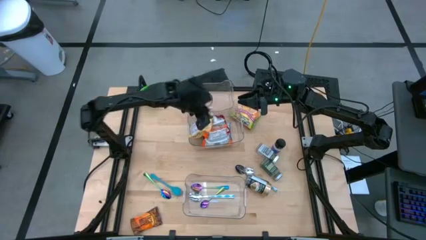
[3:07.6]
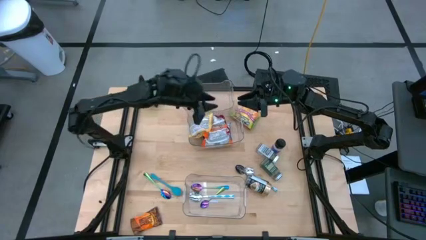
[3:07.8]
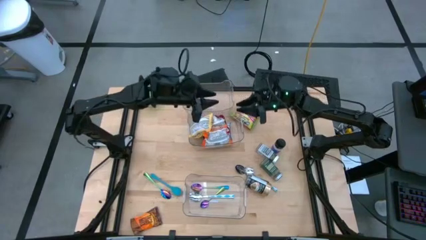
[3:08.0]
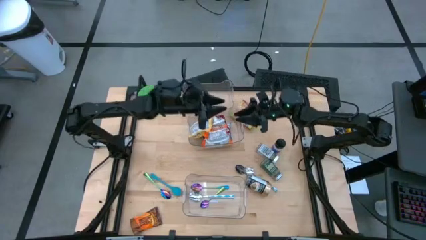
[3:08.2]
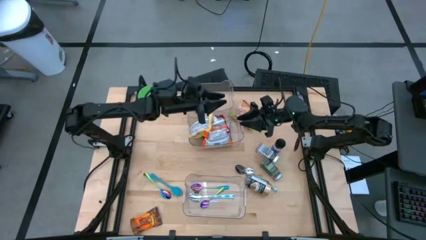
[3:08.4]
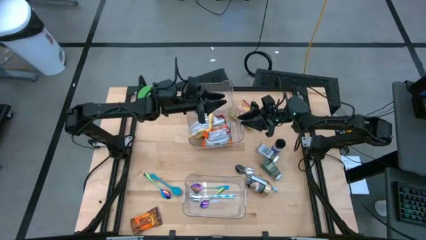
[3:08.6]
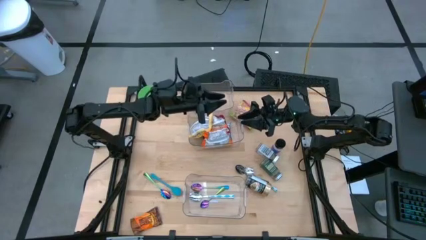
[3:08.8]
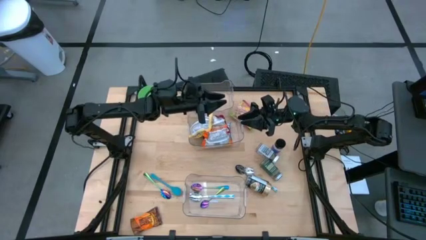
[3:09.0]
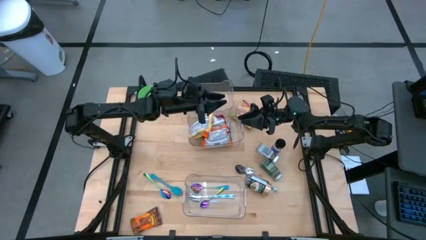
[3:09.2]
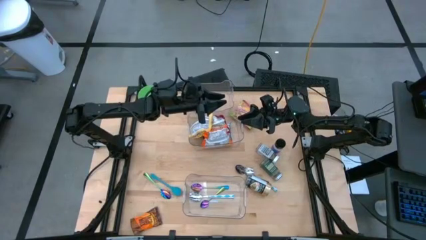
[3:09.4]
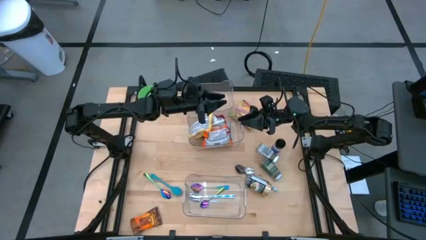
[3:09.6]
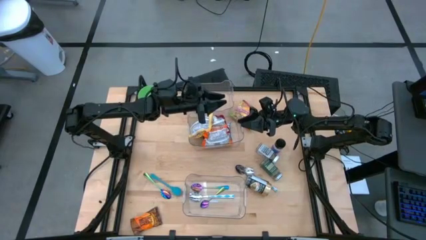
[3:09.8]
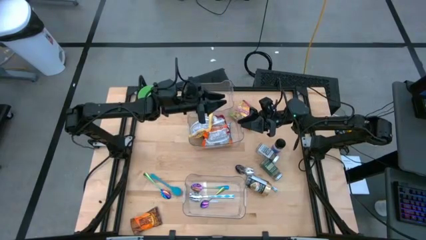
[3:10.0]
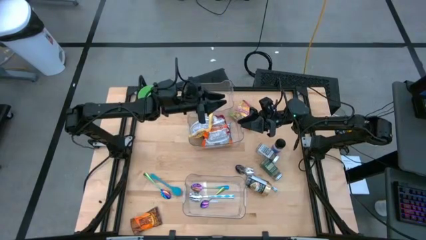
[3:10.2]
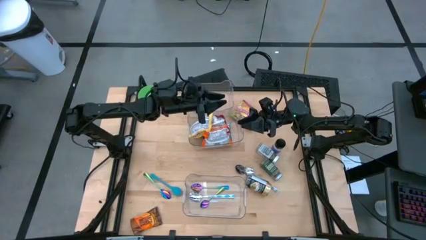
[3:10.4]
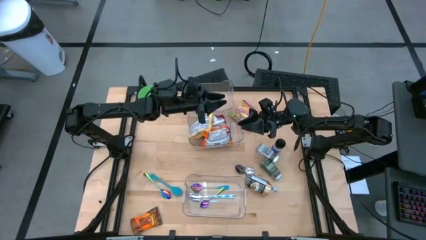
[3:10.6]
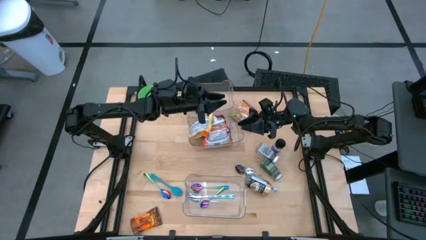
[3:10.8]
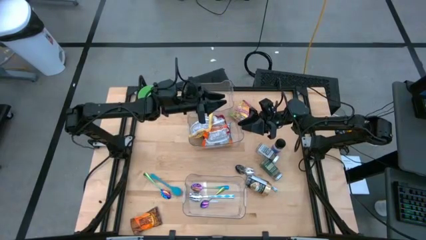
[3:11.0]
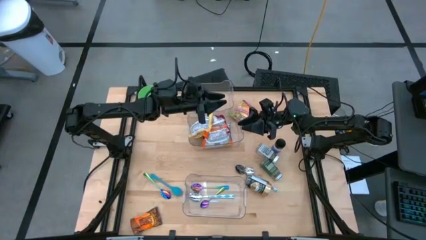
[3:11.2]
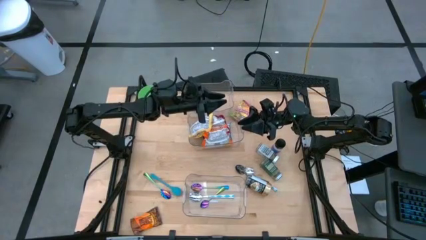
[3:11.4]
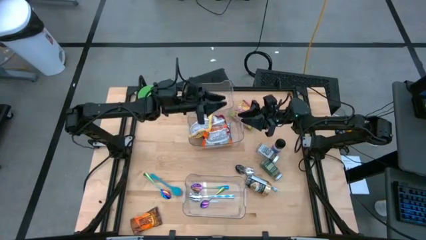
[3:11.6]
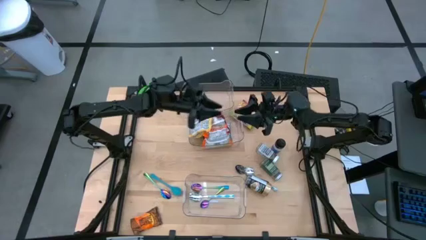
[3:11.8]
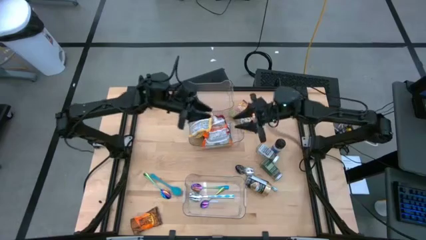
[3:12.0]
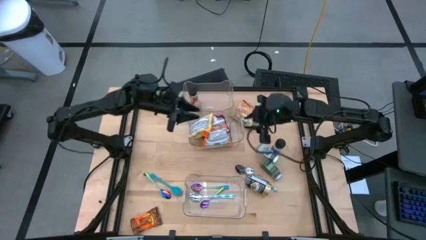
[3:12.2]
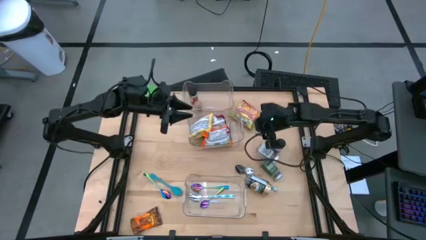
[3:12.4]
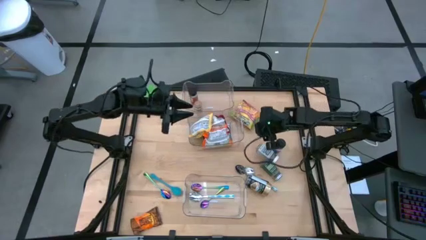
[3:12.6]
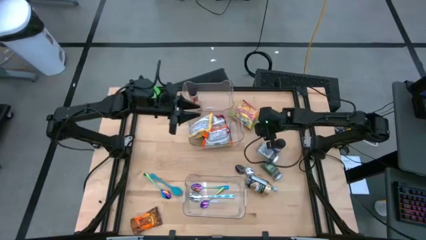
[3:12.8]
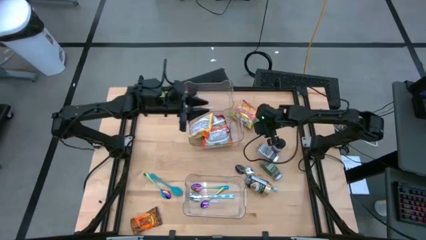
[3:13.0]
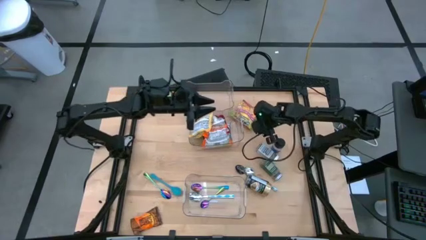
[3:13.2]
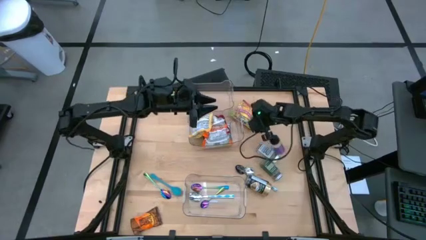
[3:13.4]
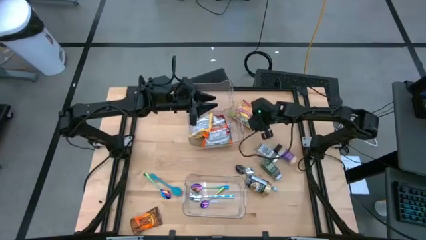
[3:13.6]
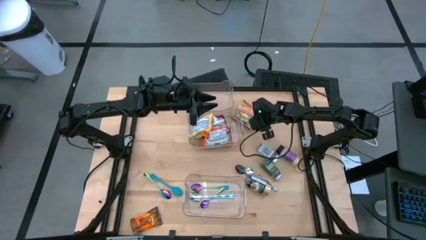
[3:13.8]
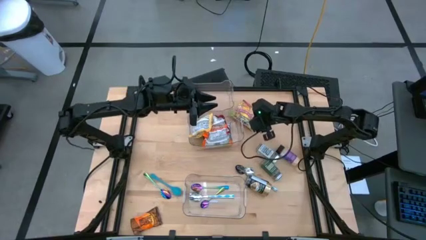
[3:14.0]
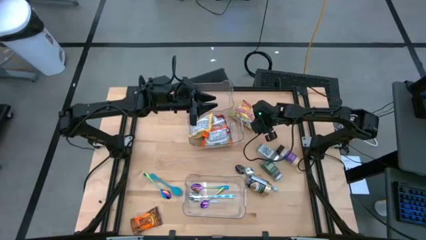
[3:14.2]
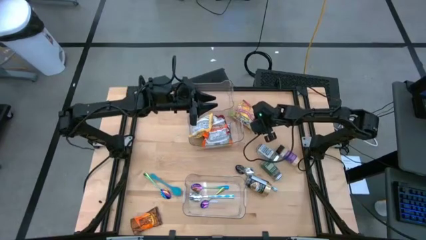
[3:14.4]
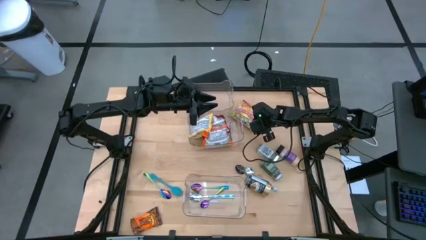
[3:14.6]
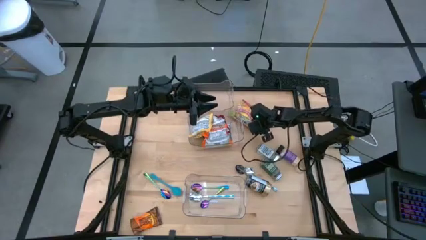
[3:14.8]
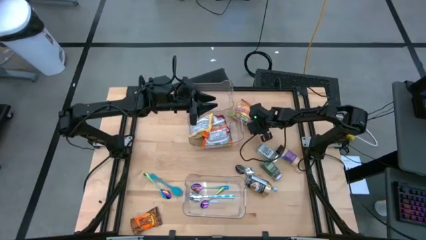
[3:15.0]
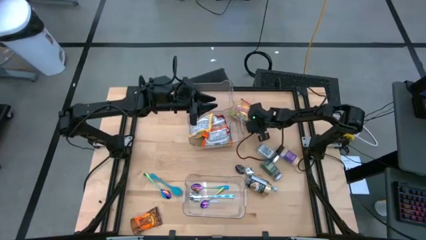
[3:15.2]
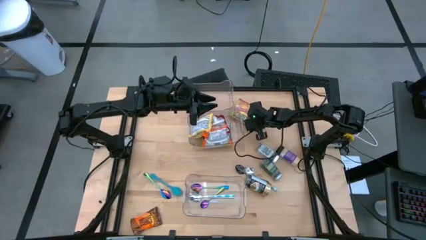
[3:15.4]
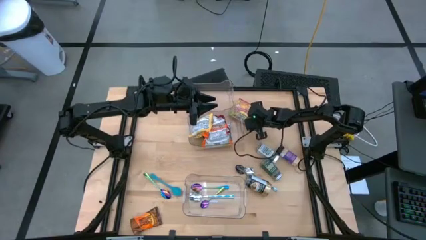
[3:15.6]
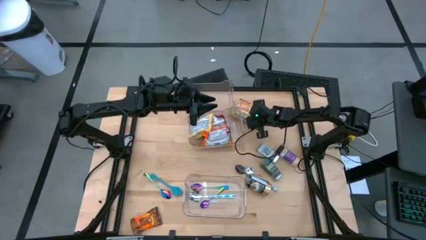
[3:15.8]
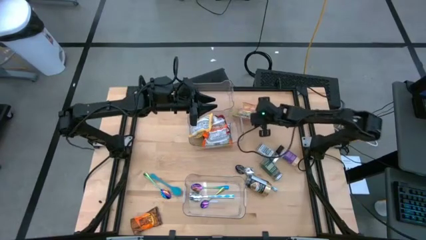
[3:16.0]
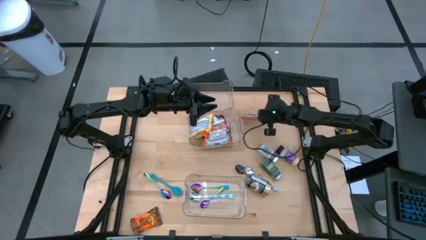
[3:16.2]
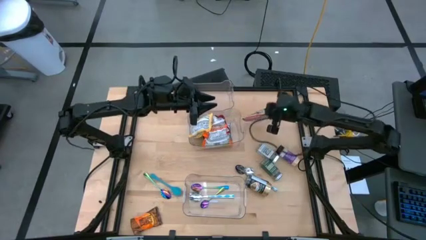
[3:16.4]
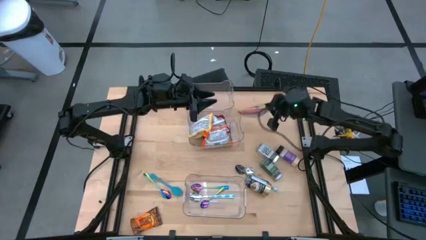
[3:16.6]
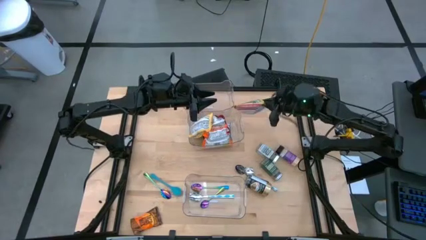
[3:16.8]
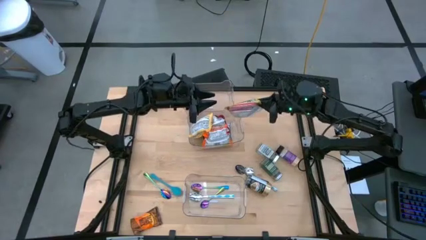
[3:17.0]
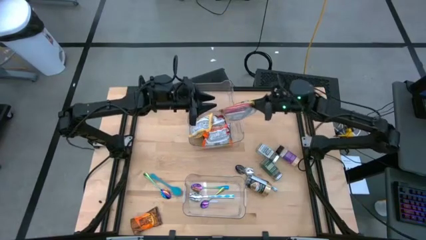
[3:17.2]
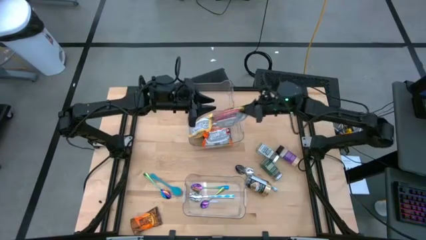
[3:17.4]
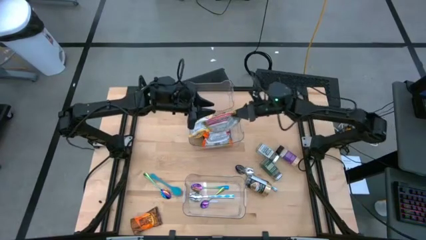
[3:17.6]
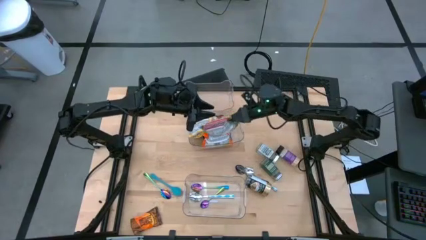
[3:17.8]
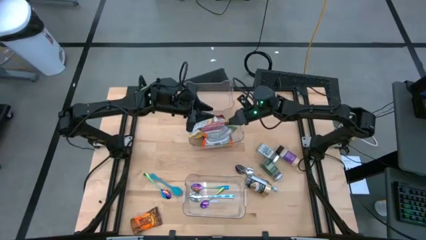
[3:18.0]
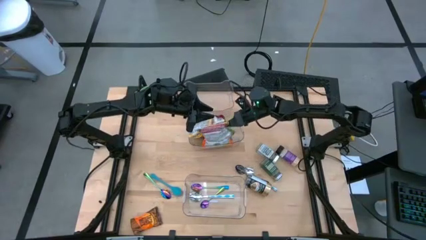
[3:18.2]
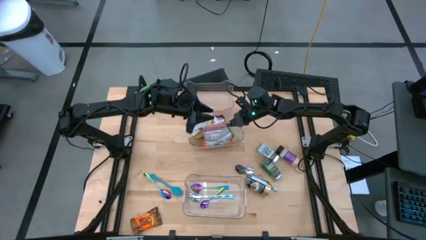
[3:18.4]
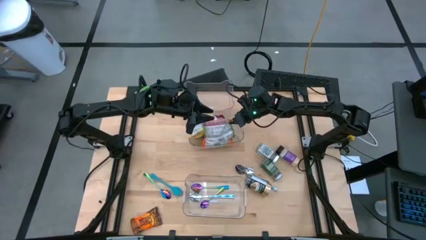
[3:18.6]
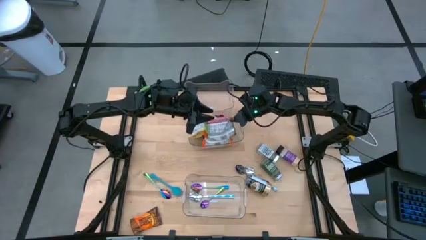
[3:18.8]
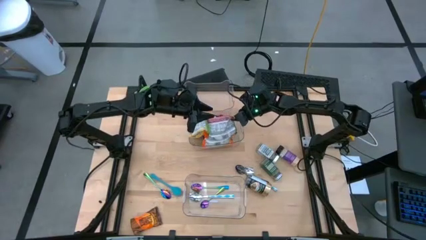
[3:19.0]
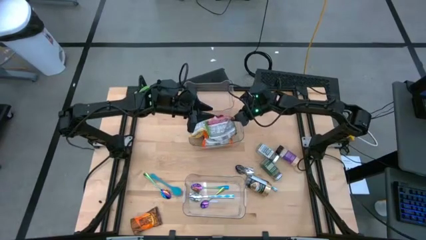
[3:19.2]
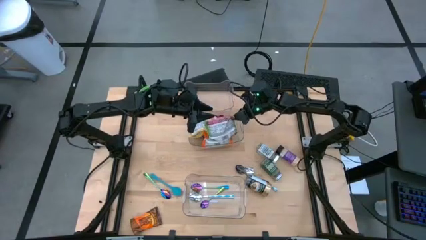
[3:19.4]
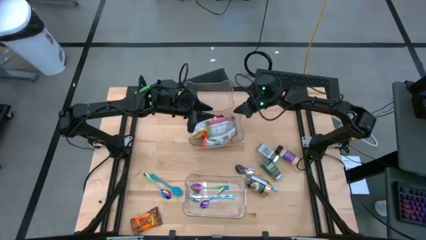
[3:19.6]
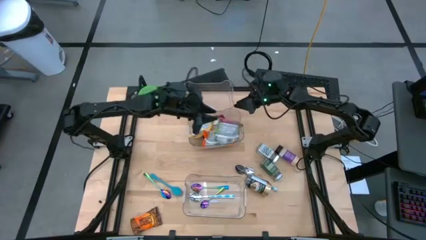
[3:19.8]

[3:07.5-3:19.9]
Task: Pick & Place Food Item
Put the green noodle pack into the middle transparent bin
